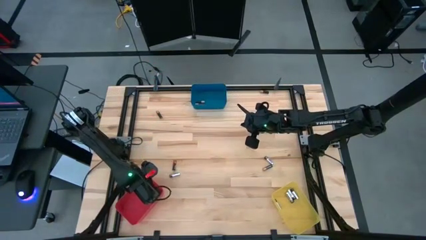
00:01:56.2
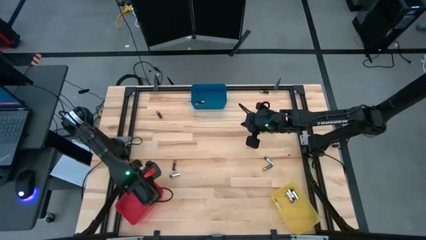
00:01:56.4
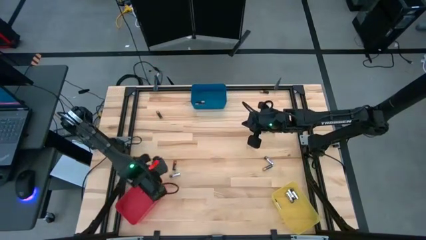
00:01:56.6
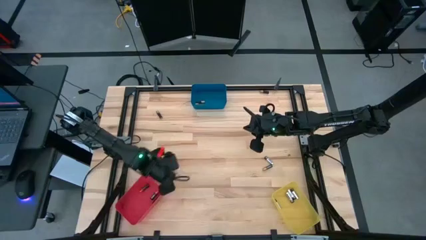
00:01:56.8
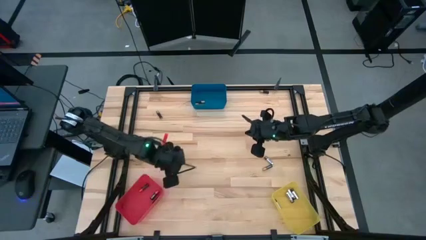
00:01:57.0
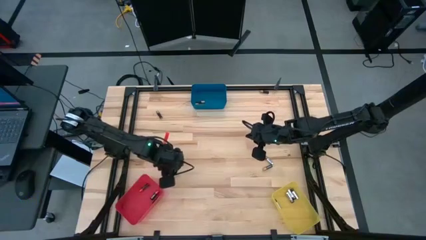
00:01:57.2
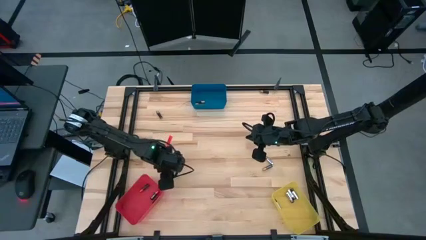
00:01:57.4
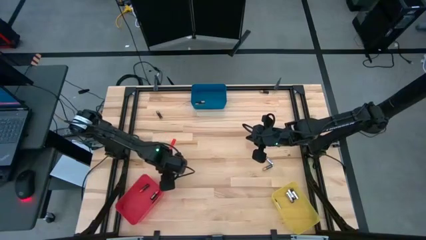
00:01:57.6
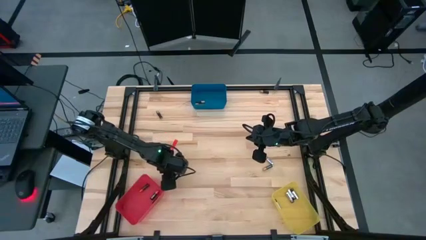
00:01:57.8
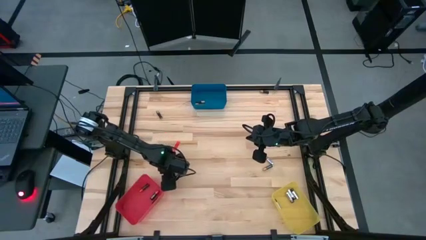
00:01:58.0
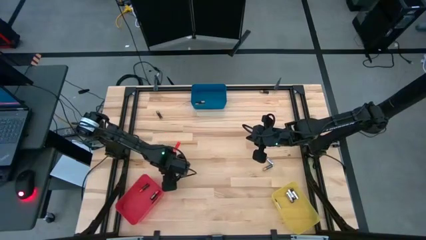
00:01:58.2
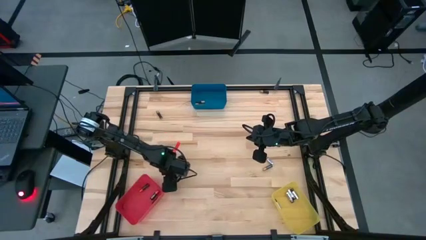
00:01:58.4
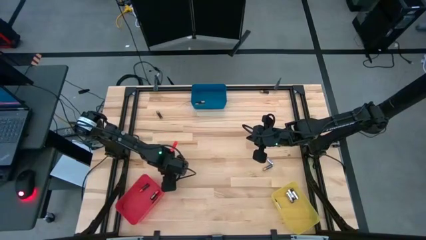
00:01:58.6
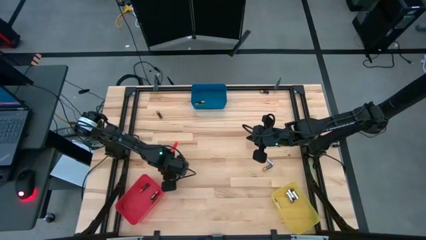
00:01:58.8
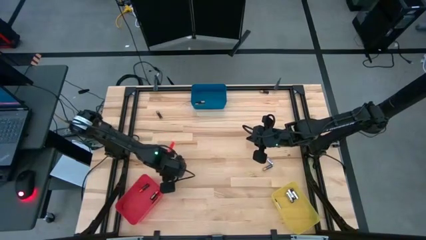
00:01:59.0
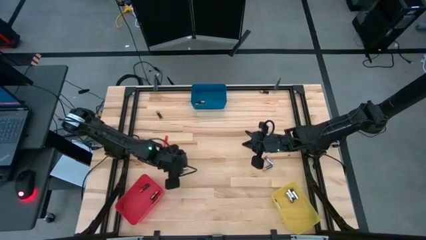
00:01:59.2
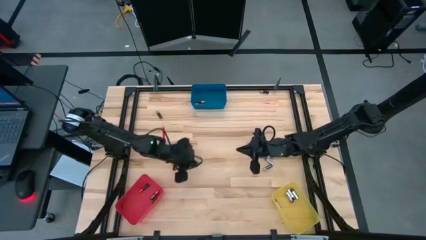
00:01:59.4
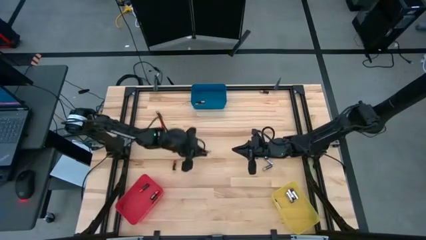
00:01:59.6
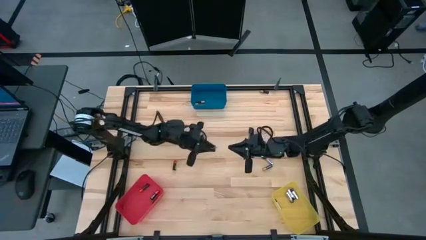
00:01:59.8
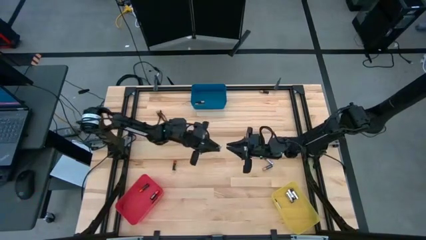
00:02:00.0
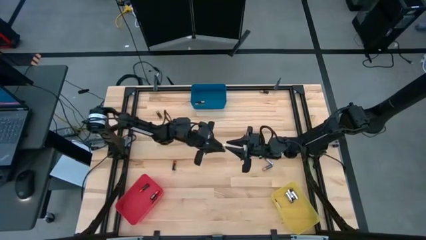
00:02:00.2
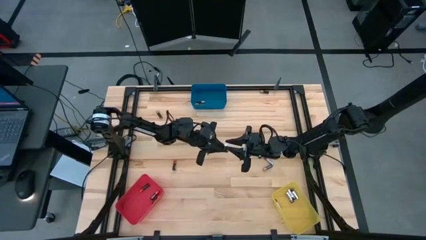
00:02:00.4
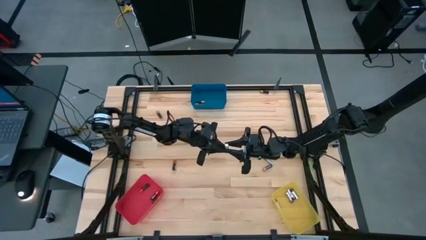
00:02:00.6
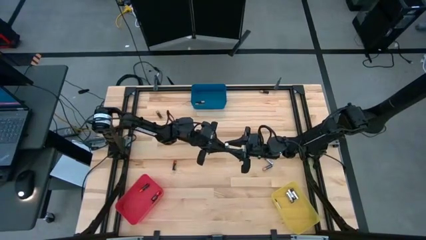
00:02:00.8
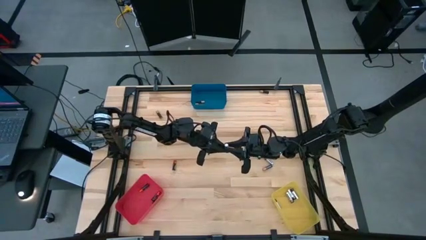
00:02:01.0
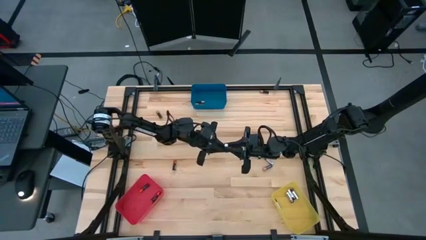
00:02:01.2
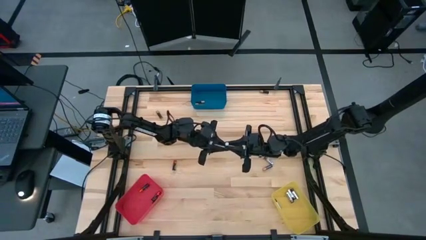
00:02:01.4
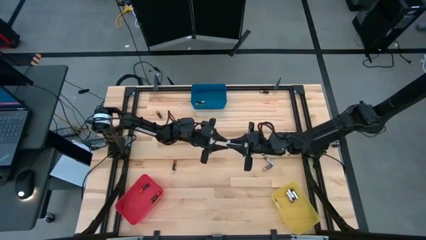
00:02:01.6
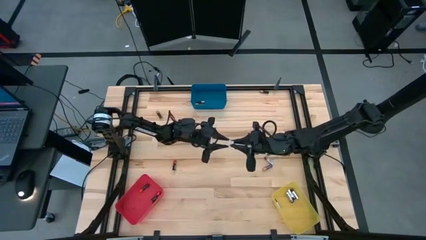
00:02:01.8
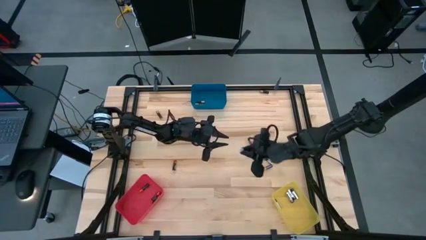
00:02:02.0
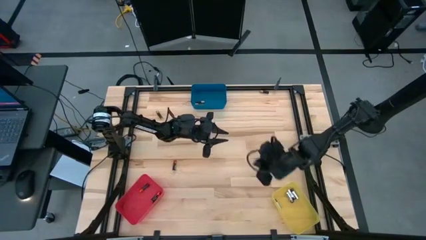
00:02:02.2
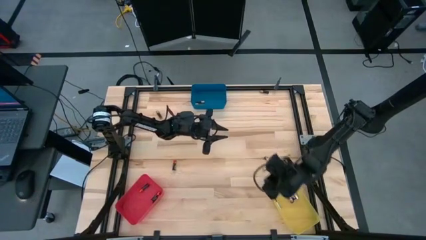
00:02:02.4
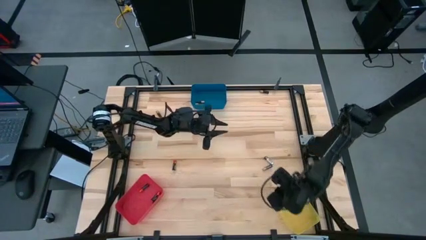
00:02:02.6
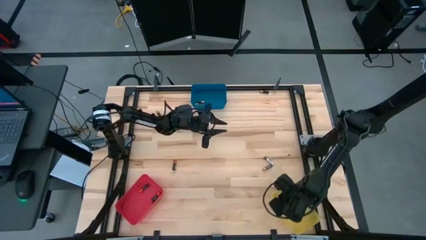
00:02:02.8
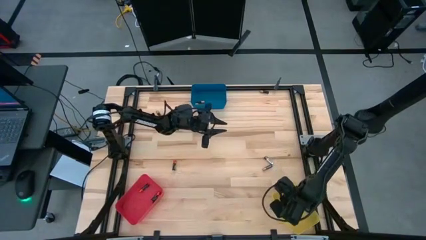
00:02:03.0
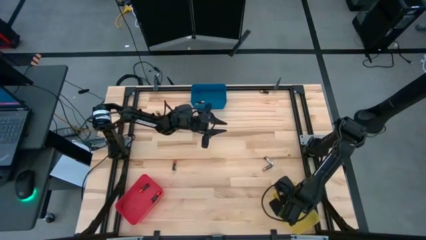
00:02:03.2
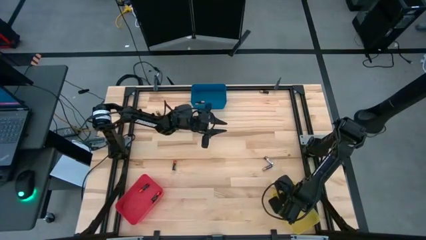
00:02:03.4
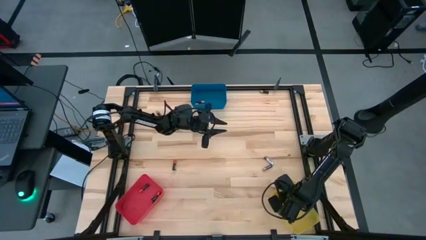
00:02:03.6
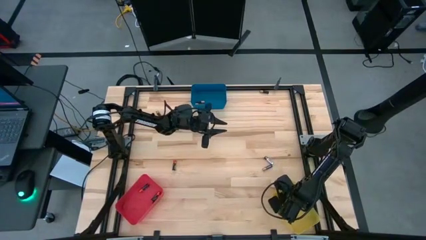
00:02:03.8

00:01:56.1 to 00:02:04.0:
Task: Sort batteries
Put the silver battery into the yellow bin

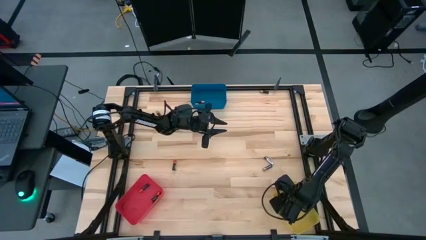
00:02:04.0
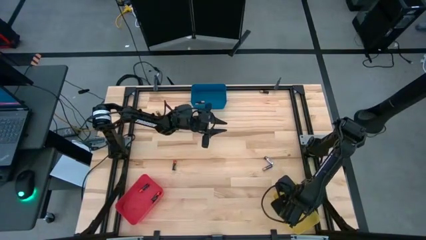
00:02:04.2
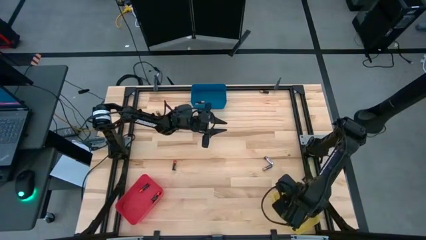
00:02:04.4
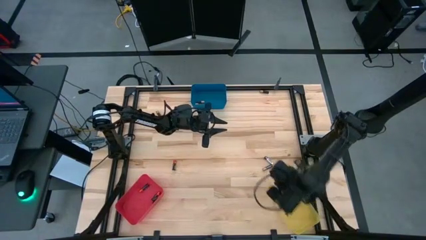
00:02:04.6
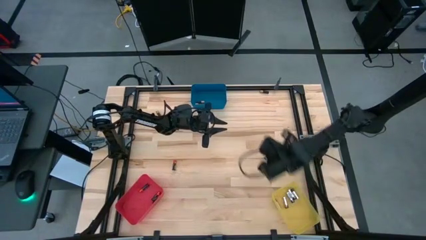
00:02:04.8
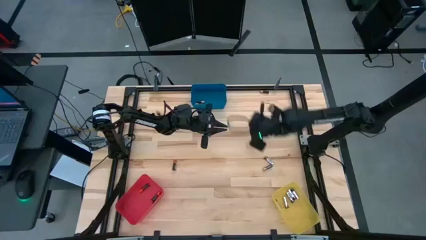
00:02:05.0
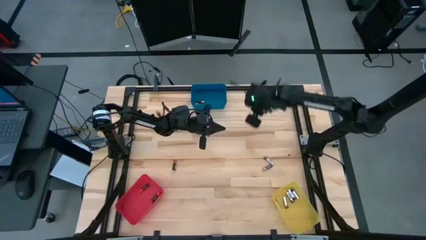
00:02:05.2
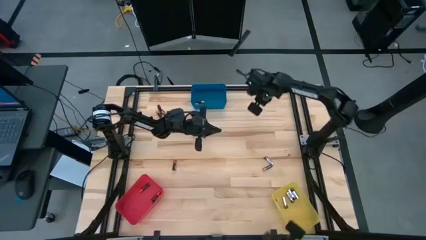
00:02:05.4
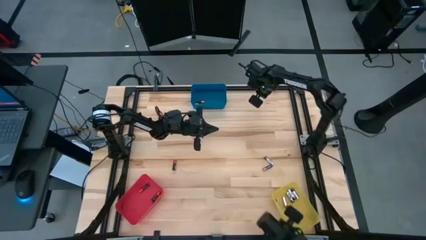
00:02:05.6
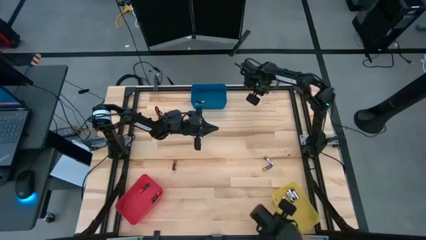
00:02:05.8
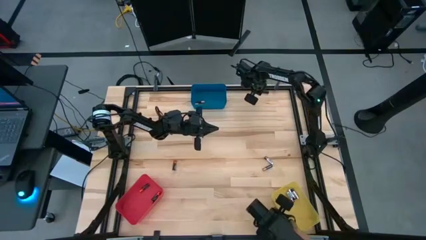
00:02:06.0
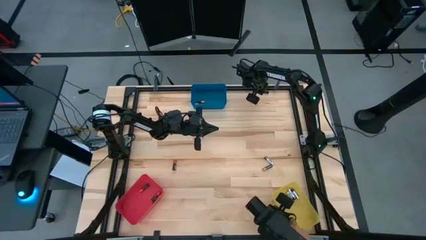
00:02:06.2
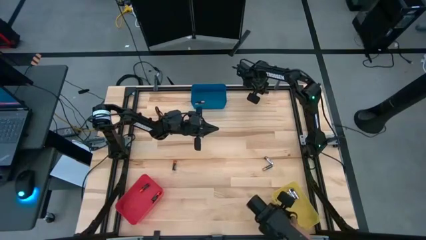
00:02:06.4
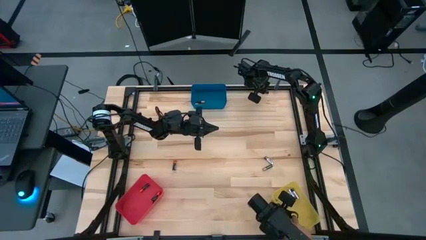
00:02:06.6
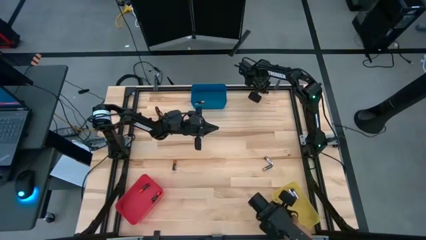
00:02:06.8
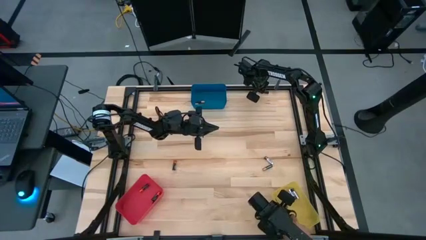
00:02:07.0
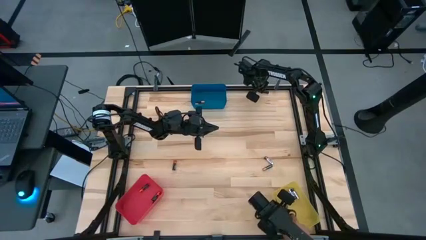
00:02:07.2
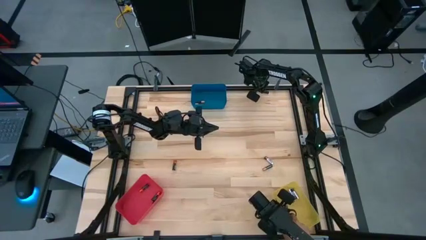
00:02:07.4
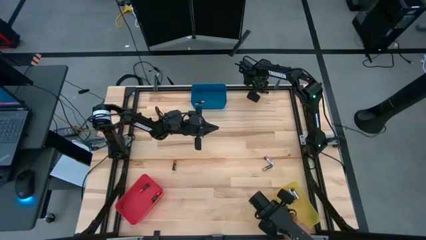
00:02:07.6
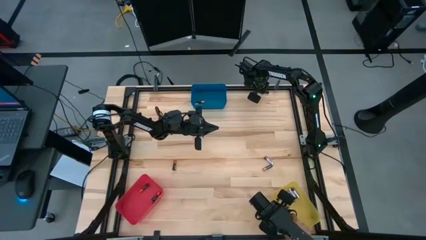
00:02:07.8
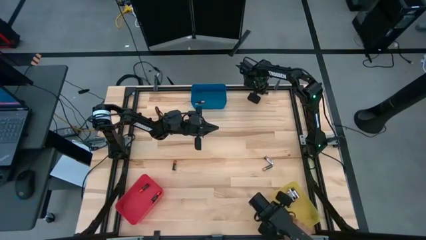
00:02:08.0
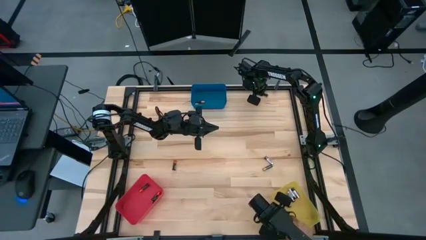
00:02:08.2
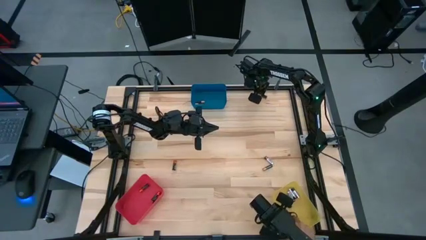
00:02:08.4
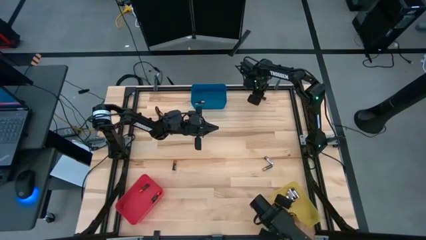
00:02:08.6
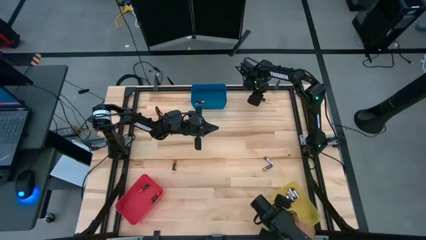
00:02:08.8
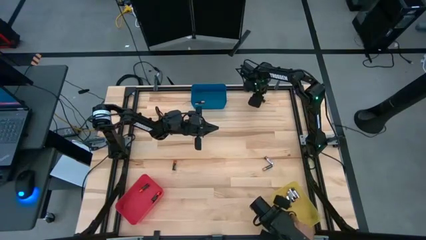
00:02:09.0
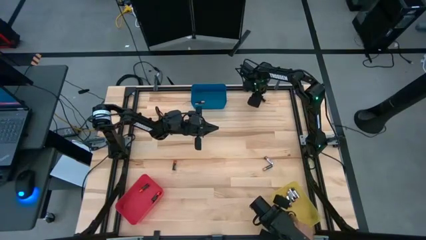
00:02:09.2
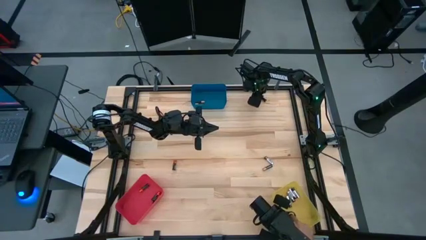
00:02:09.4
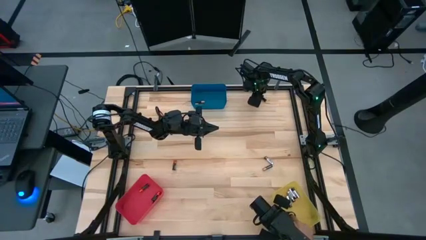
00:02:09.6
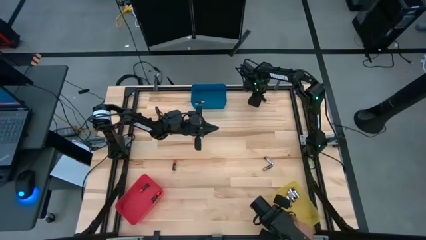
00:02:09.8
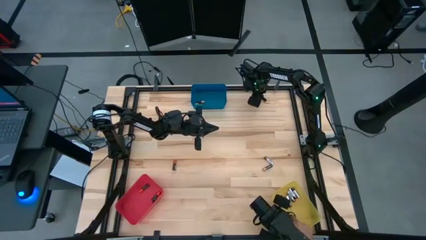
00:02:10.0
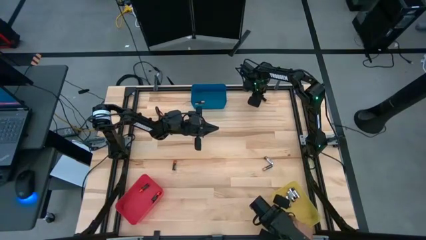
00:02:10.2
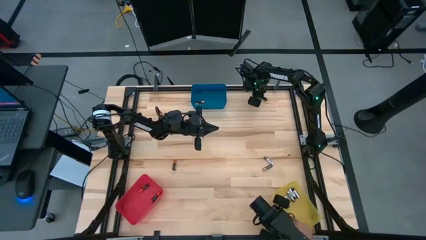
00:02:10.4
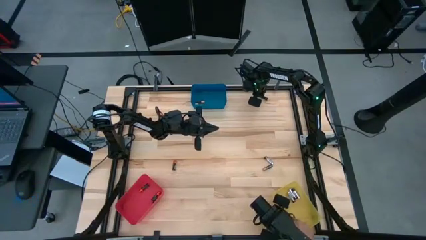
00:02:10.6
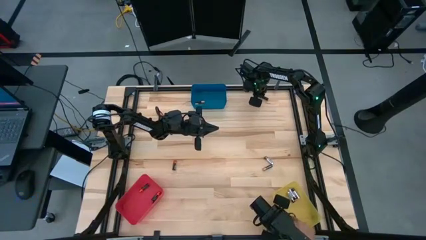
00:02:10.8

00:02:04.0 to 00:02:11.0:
Put the black-brown battery into the blue bin
